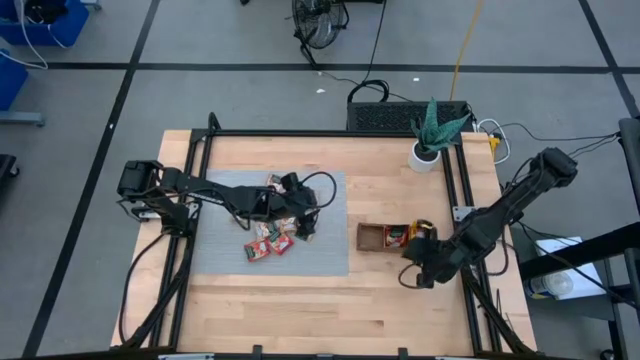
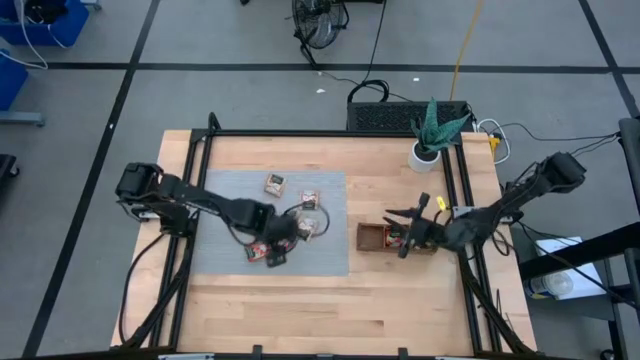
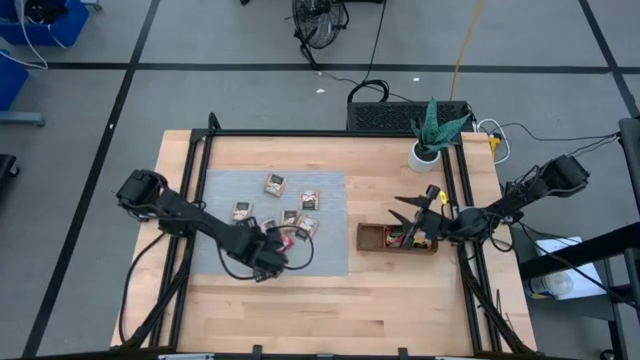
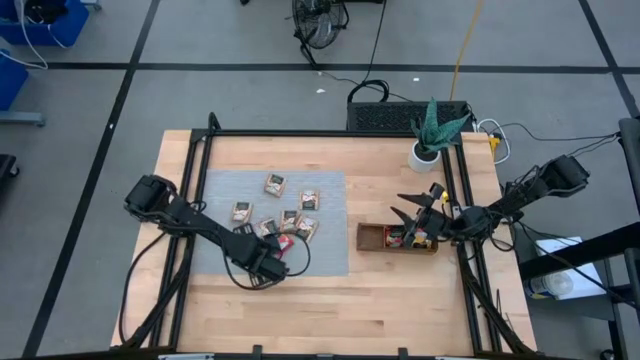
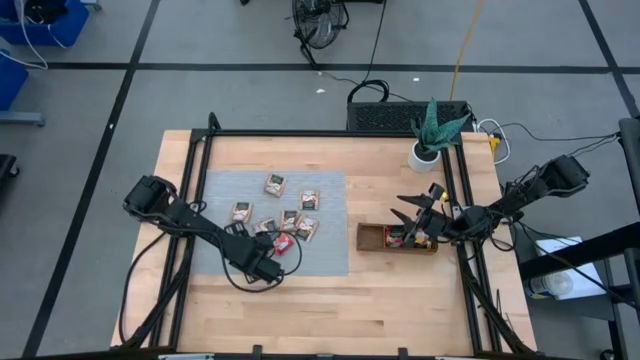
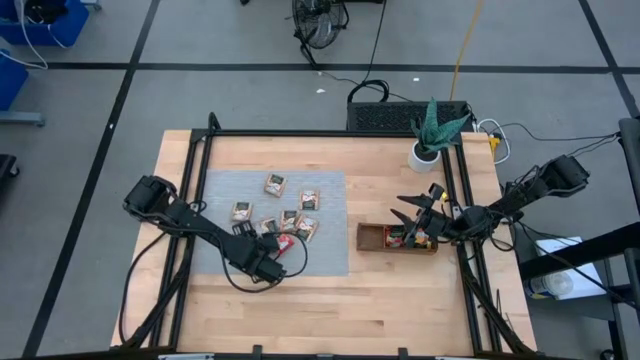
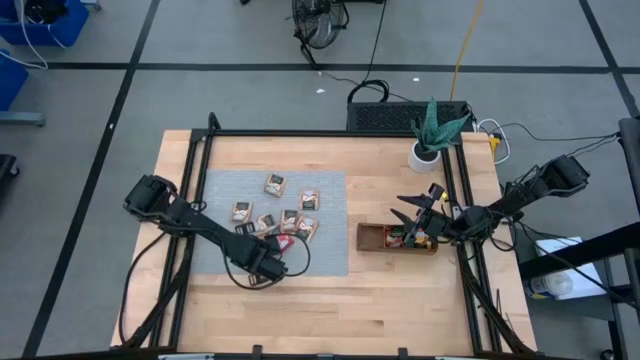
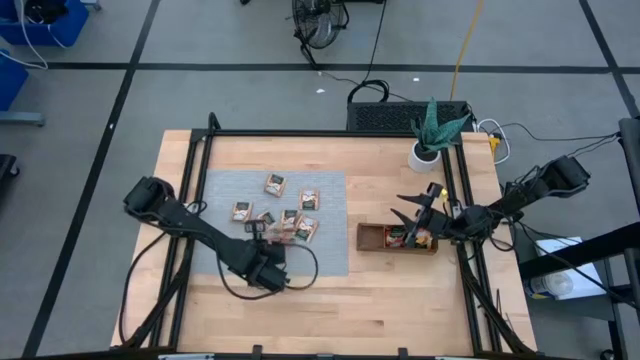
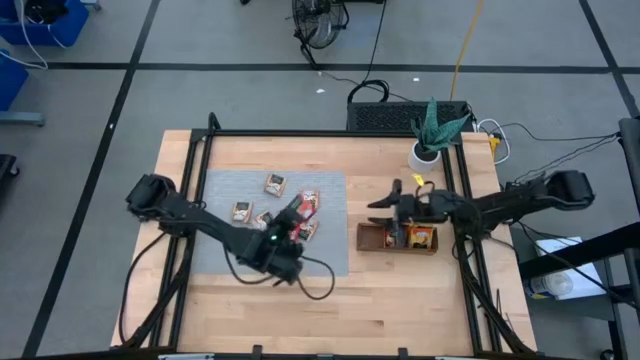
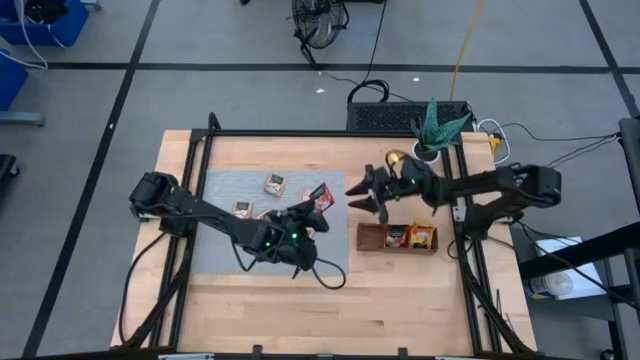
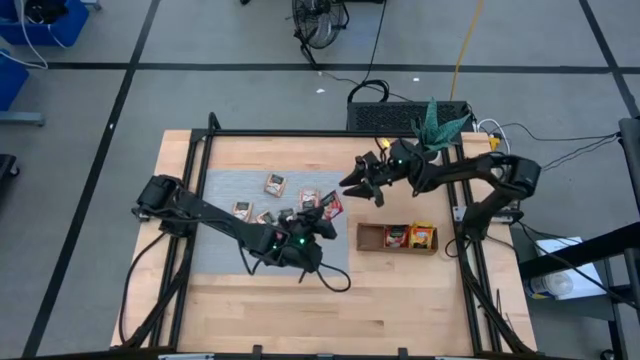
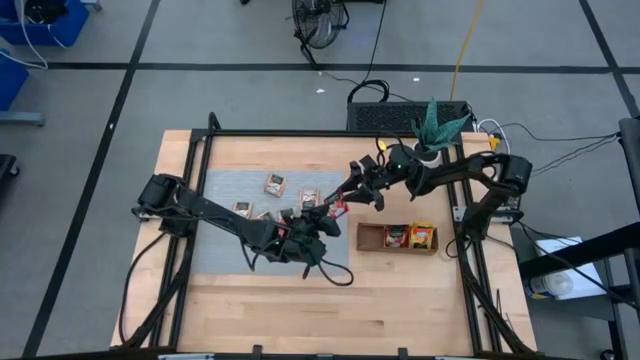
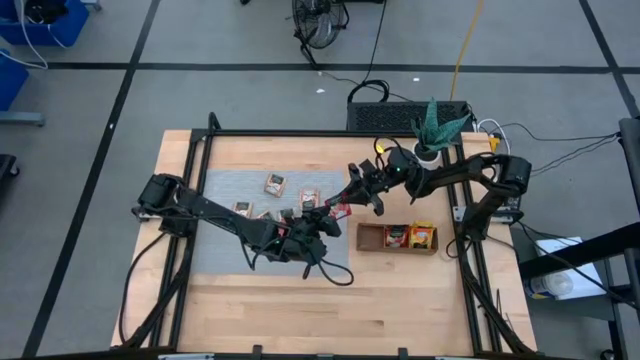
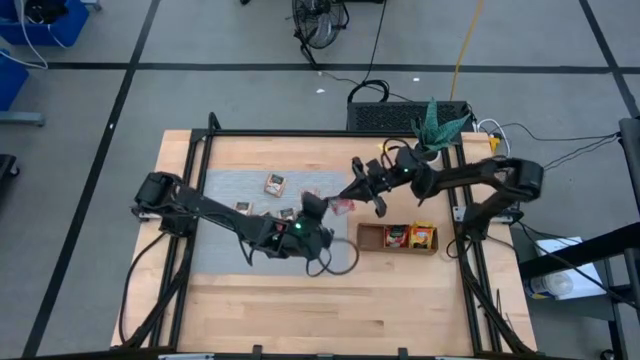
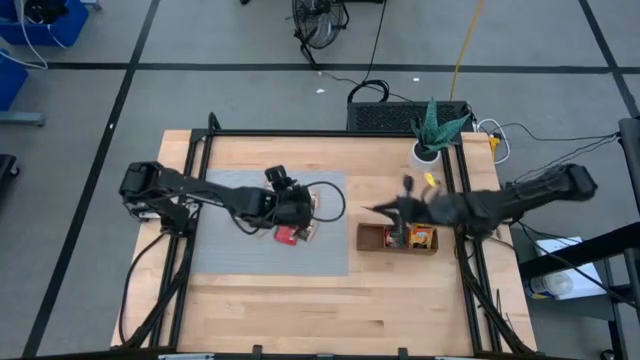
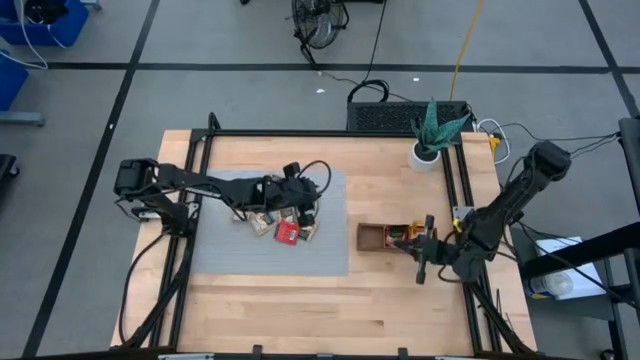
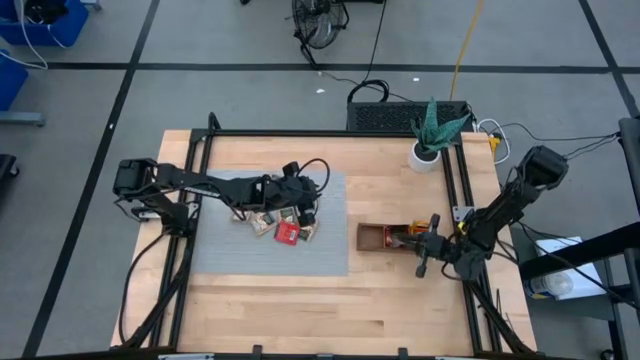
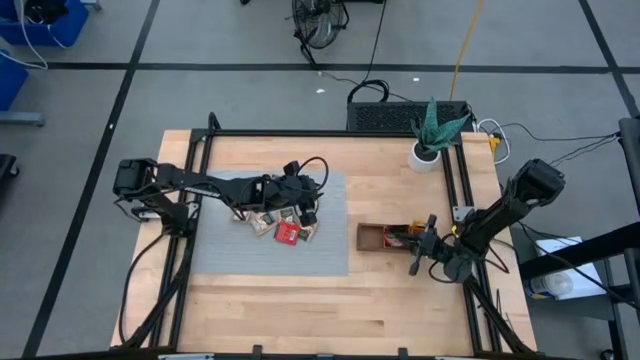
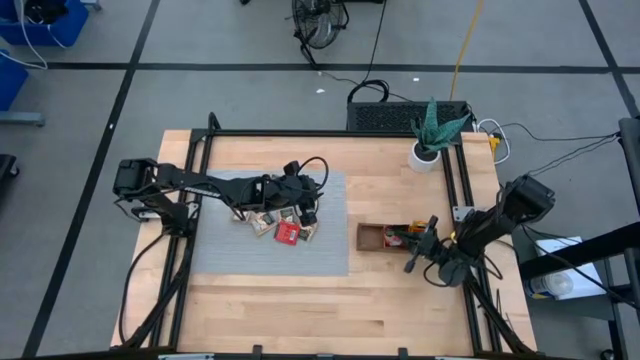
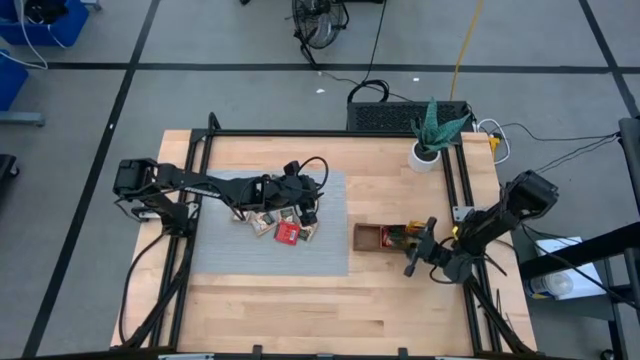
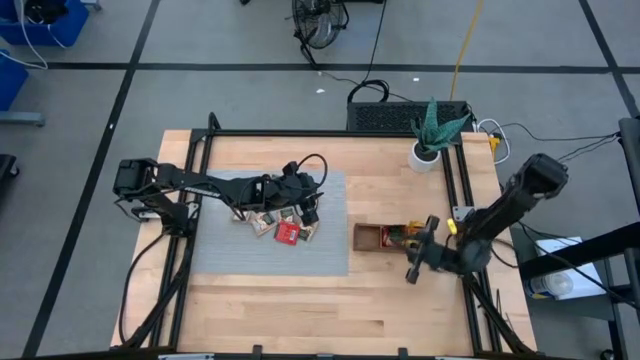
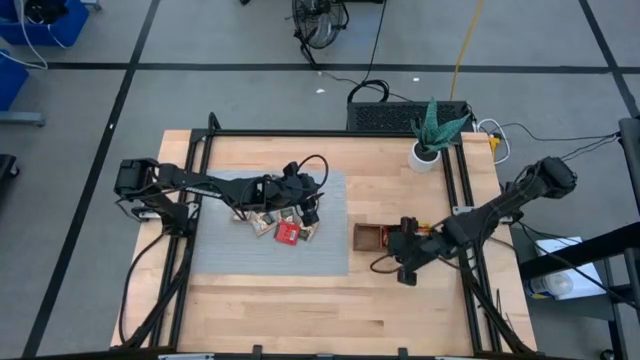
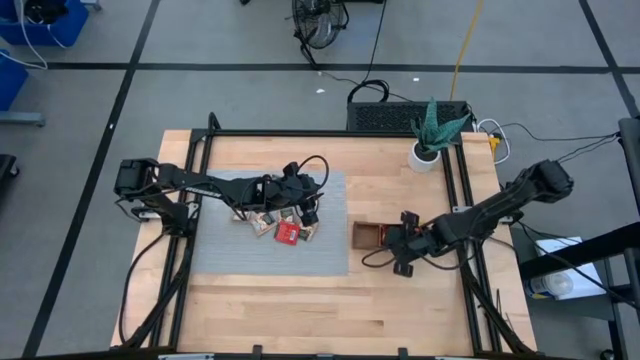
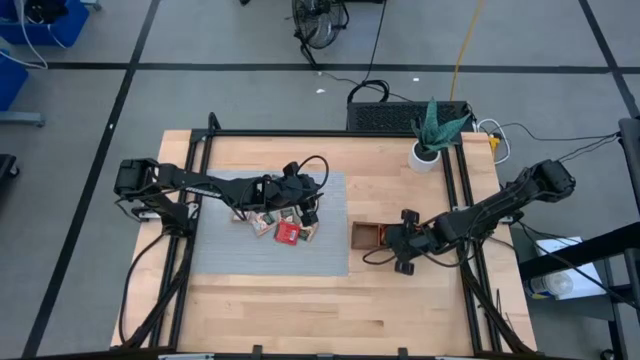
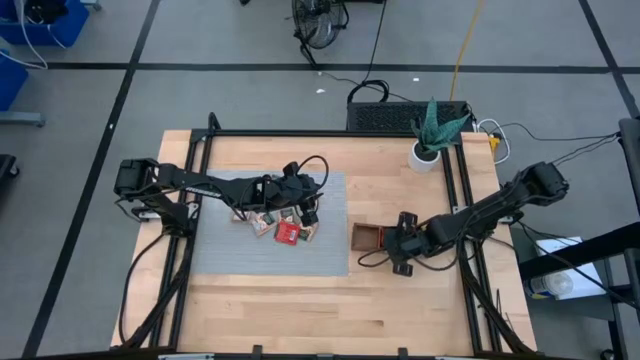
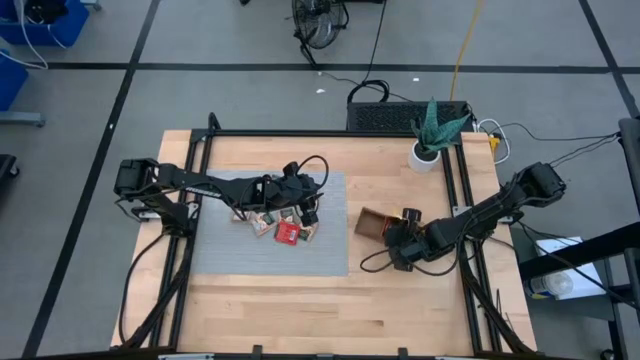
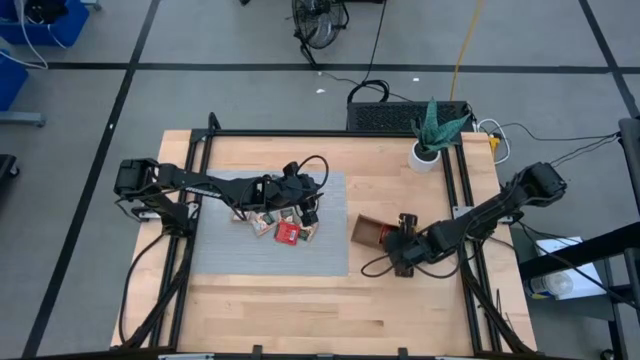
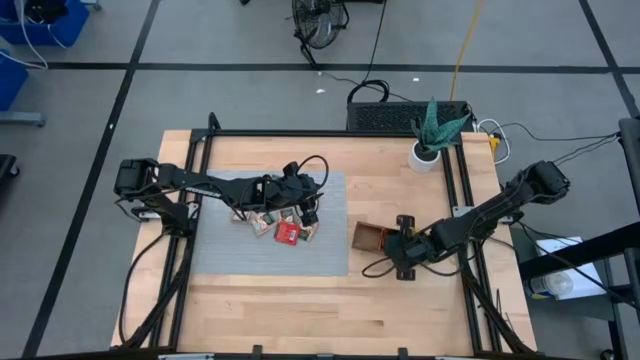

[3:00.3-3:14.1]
Task: Pick & Place Tea
Put the red tea bag into the middle section of the wooden organizer

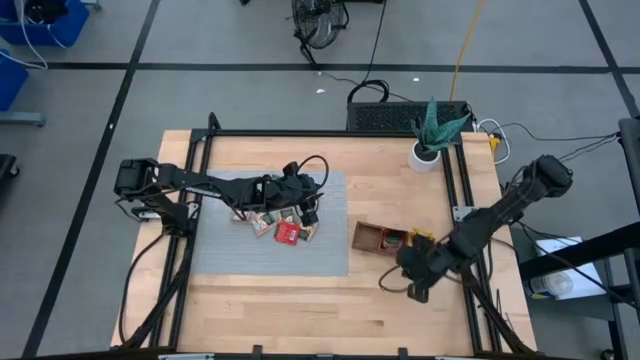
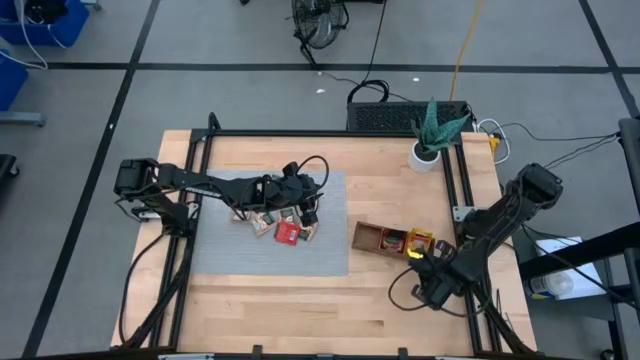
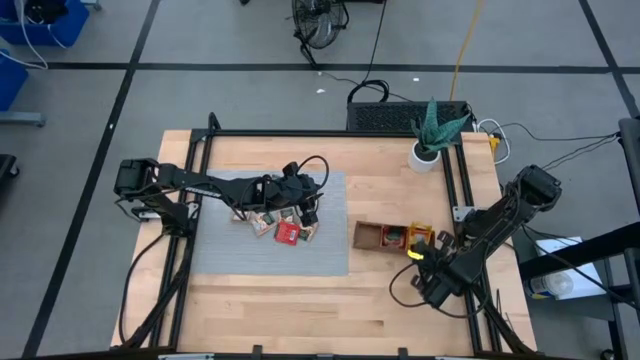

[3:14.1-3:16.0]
Adjust the wooden organizer on the table

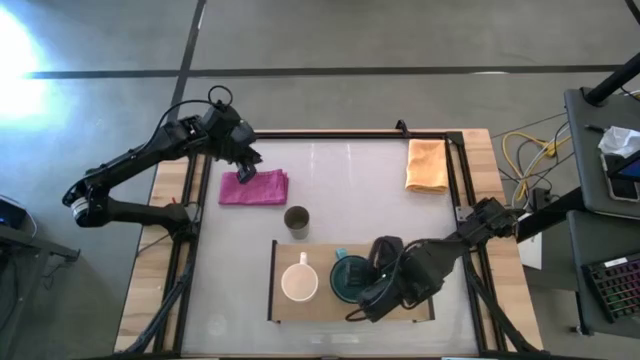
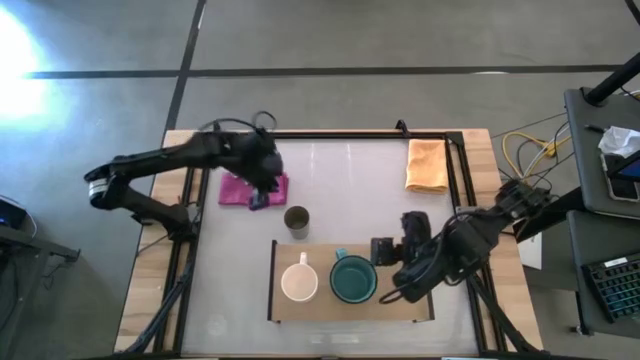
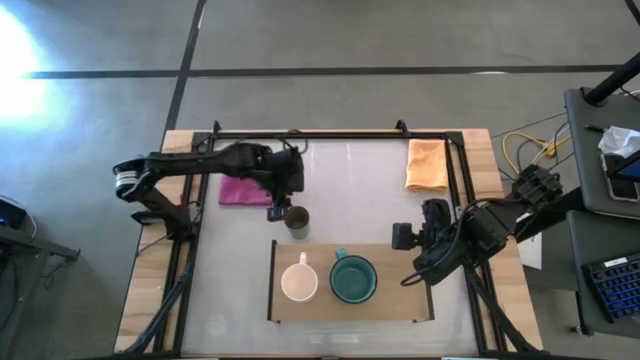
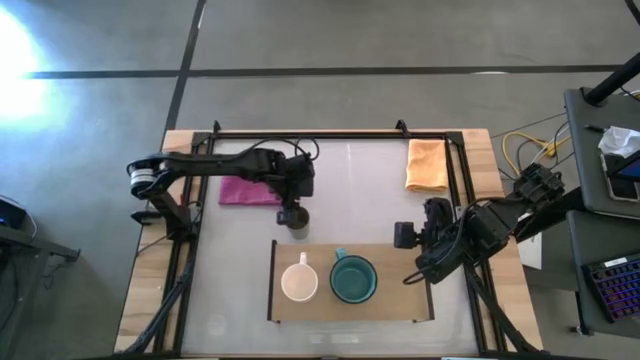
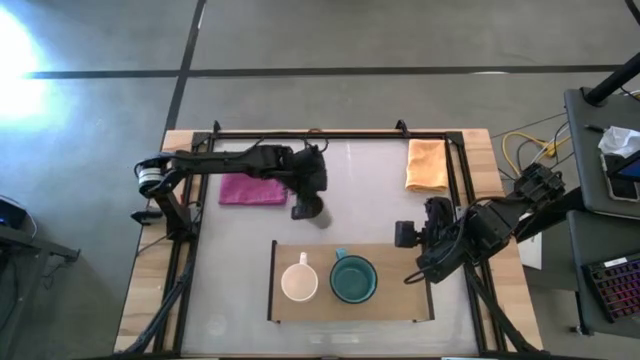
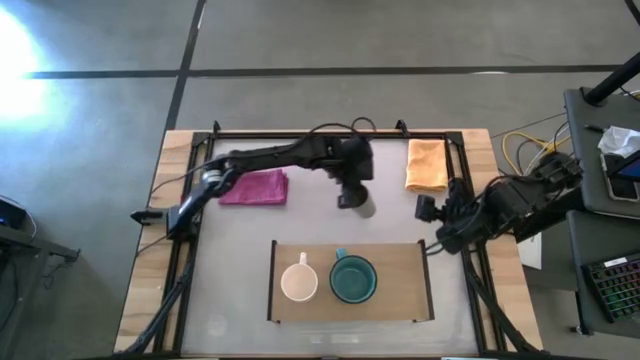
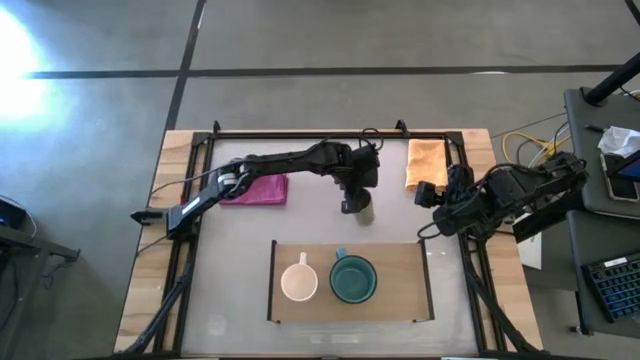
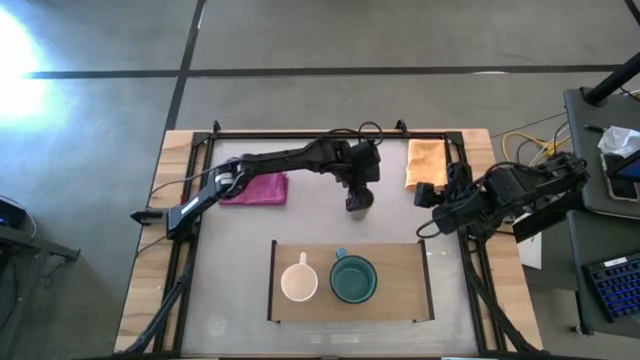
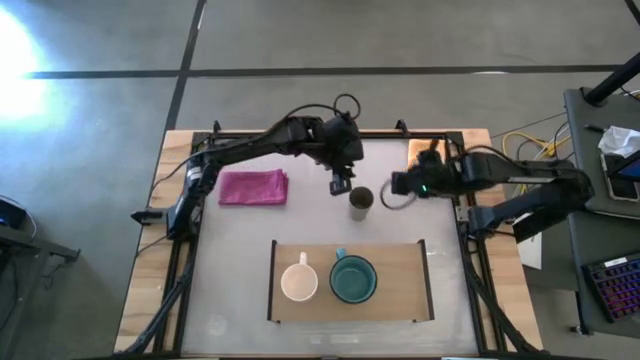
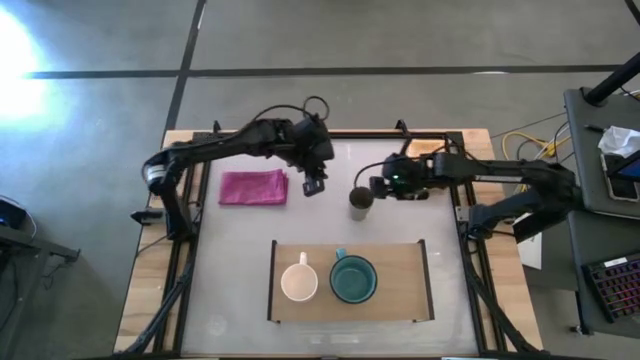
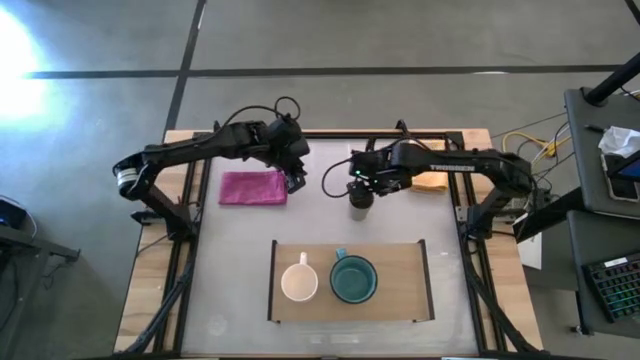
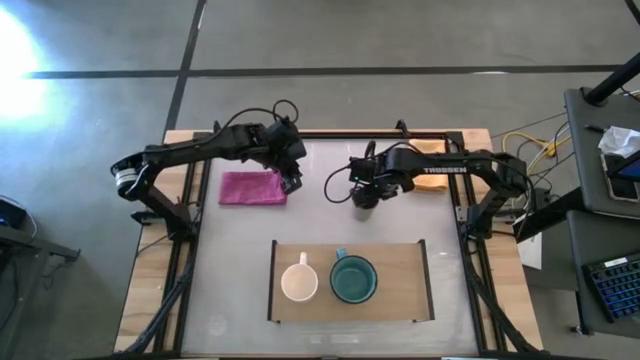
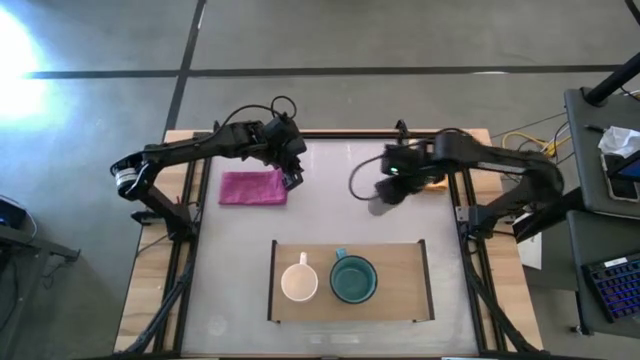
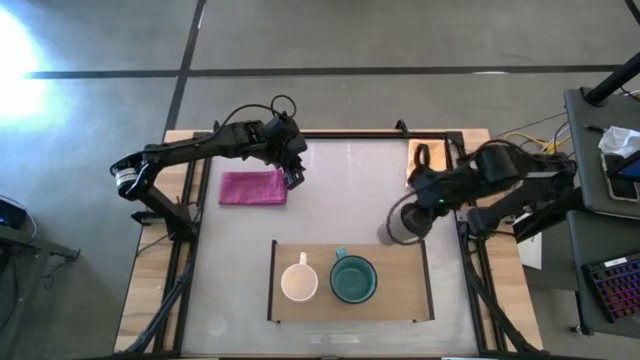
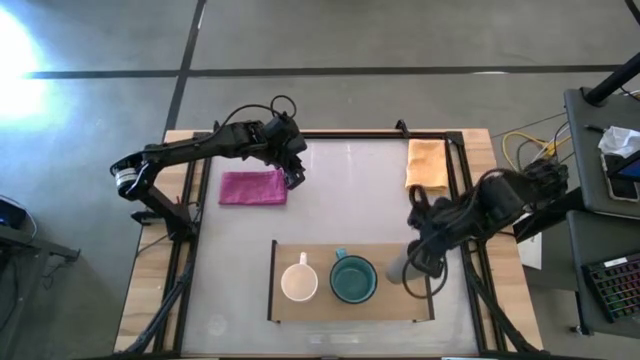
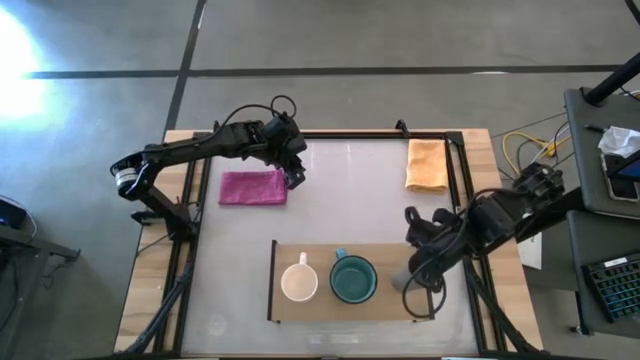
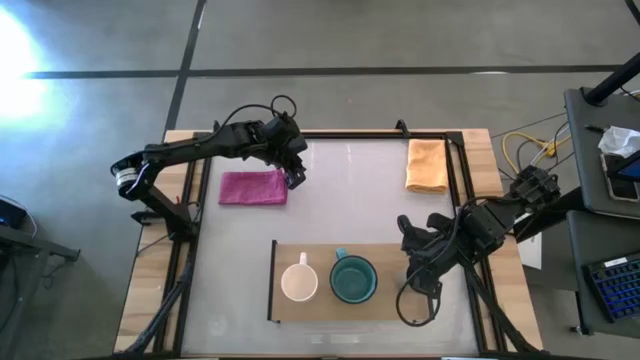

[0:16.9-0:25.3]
Task: Stack small to large cups/mugs on shelf
Put the gray cup on the shelf
